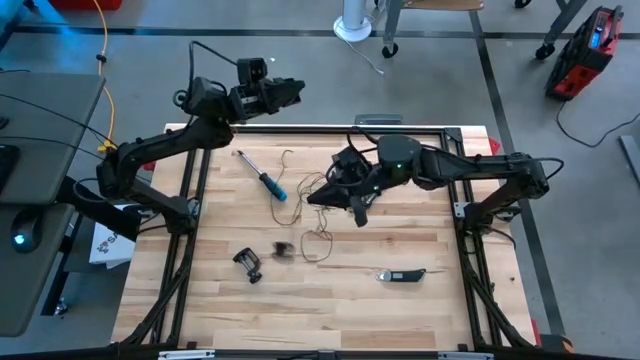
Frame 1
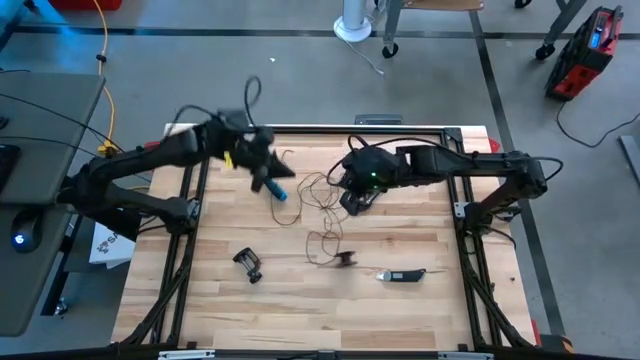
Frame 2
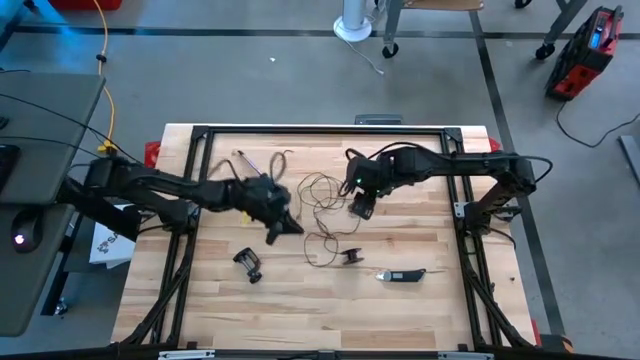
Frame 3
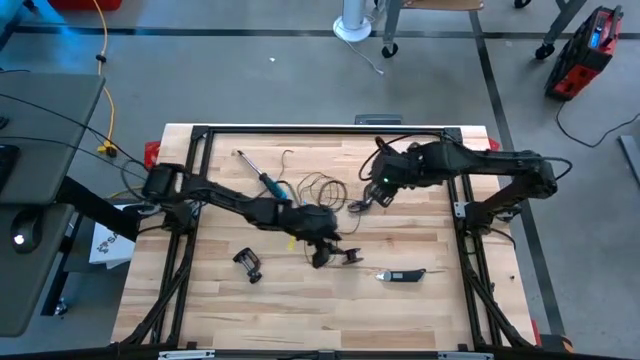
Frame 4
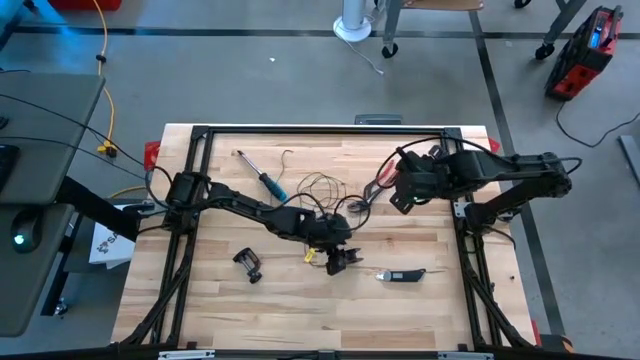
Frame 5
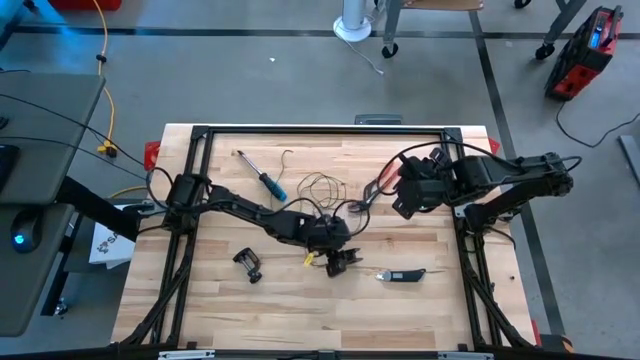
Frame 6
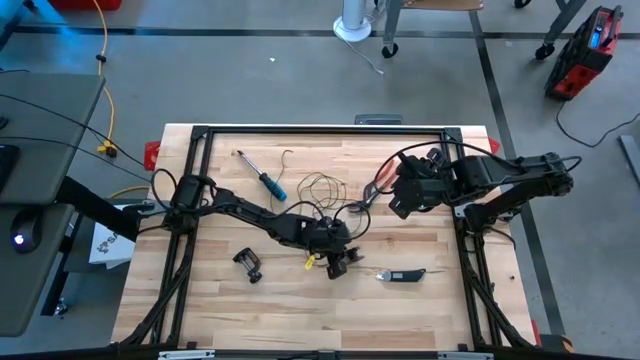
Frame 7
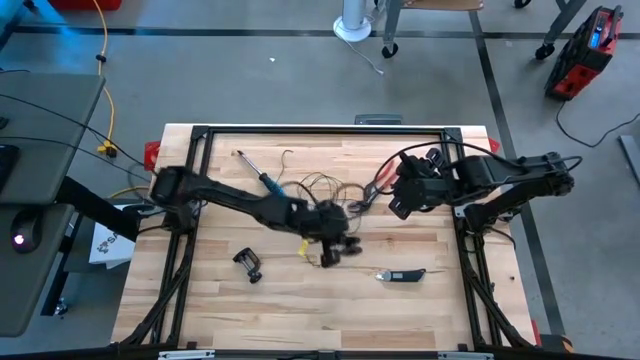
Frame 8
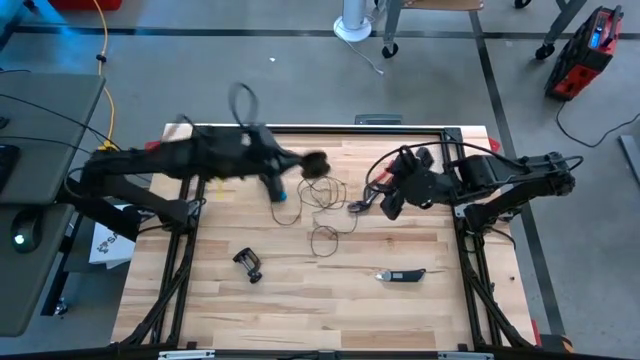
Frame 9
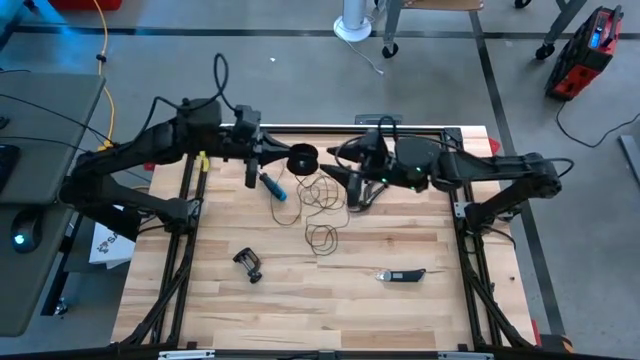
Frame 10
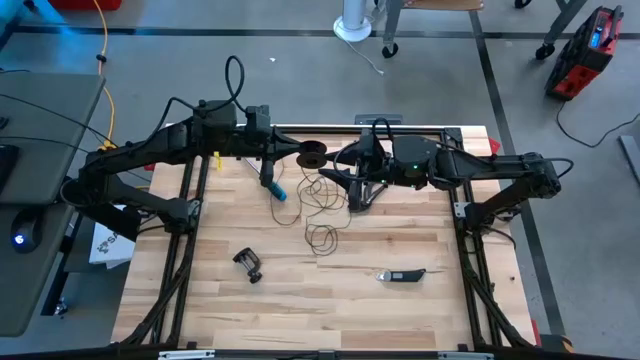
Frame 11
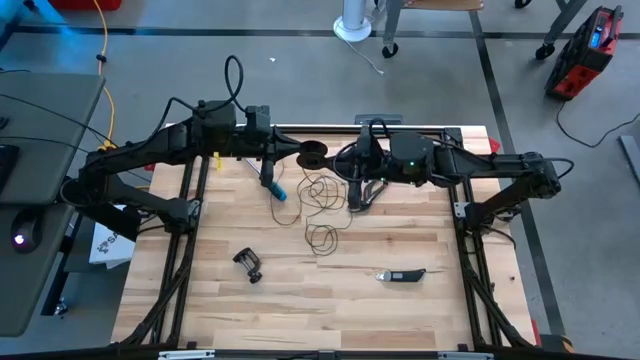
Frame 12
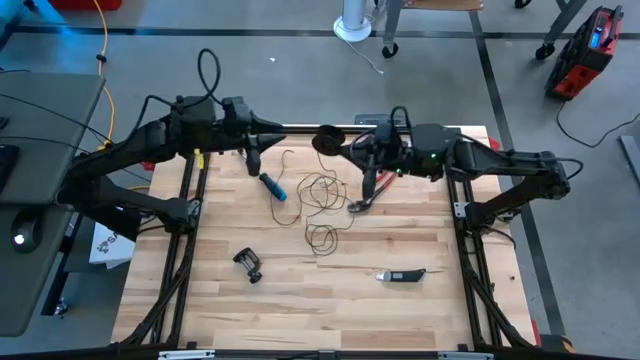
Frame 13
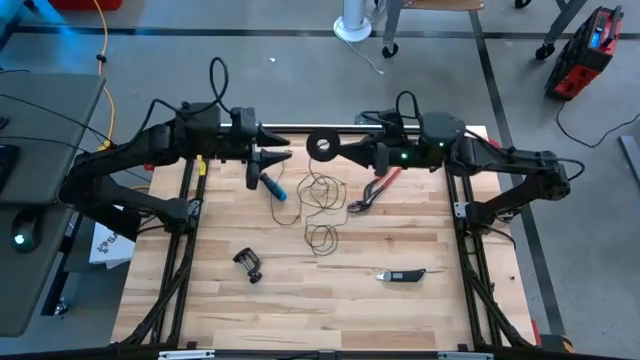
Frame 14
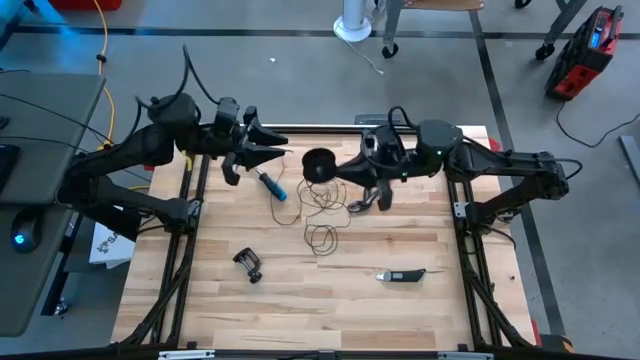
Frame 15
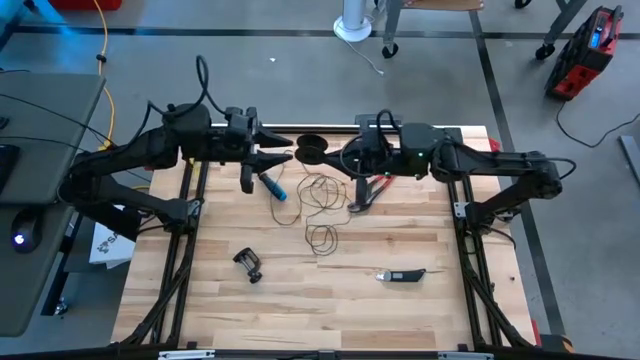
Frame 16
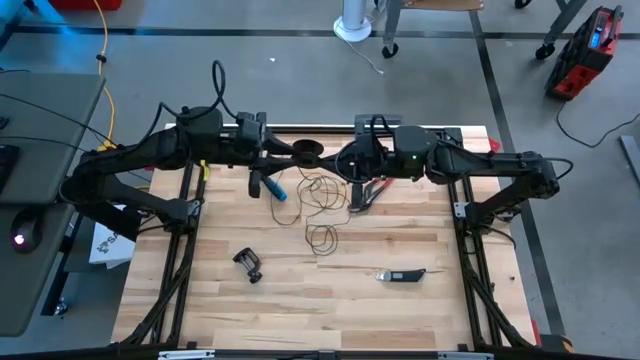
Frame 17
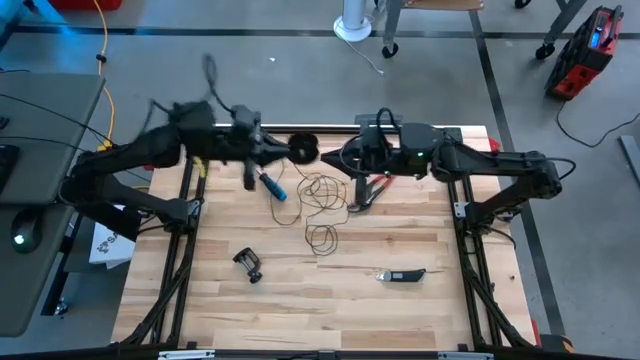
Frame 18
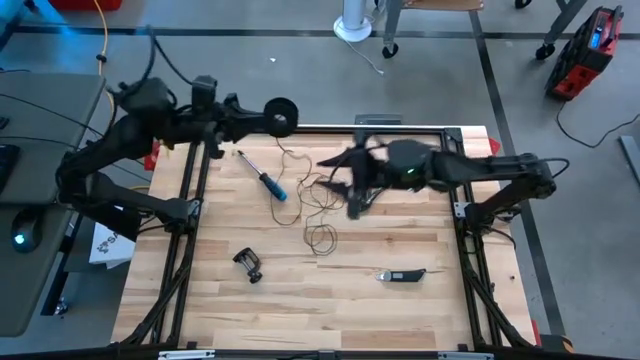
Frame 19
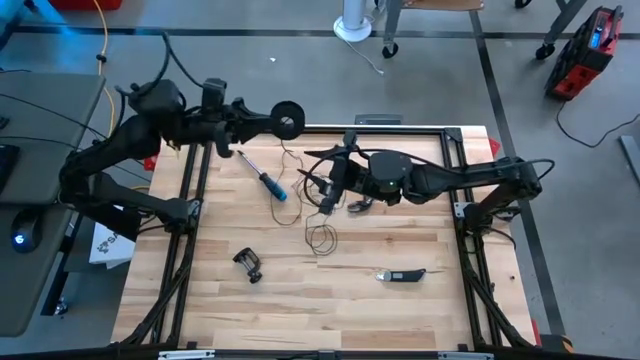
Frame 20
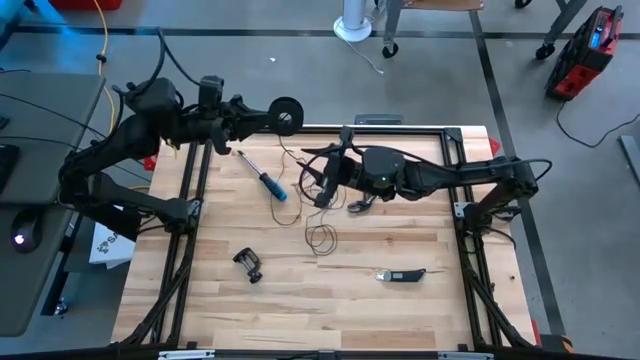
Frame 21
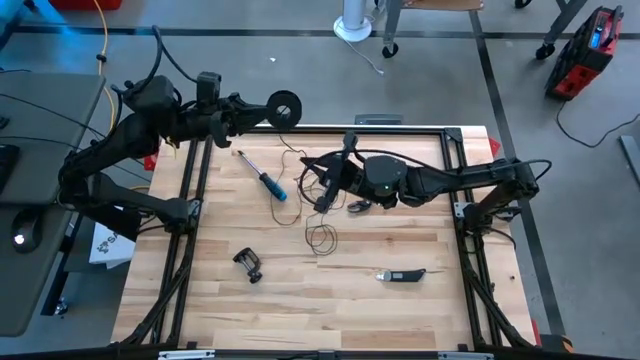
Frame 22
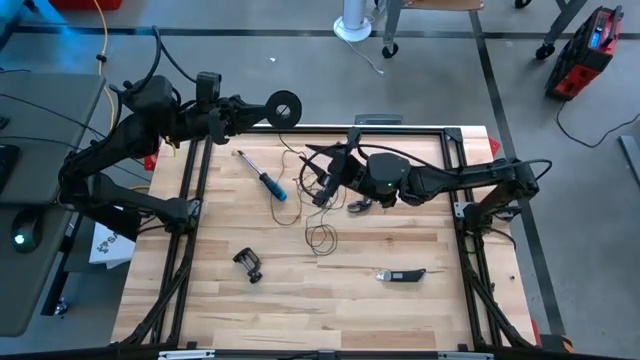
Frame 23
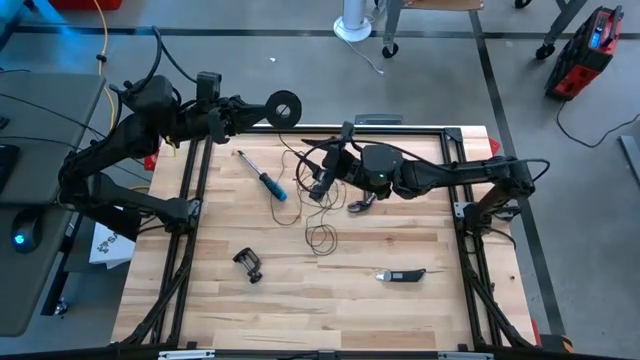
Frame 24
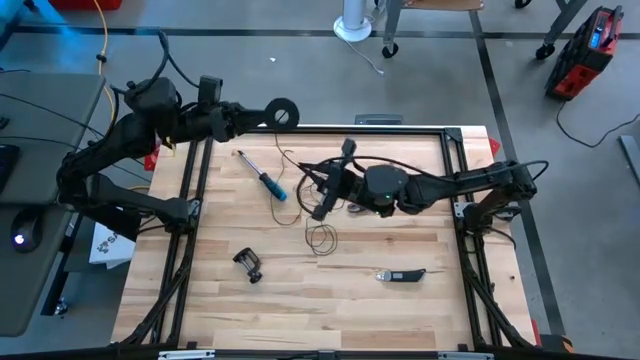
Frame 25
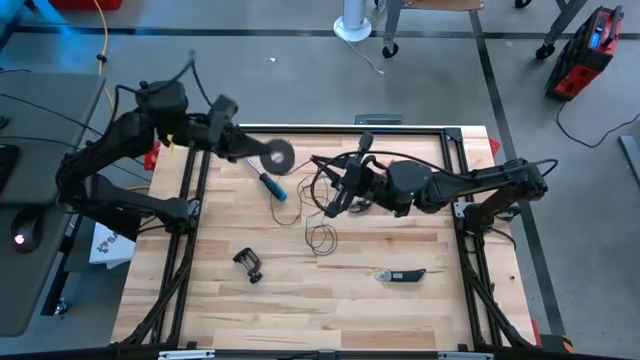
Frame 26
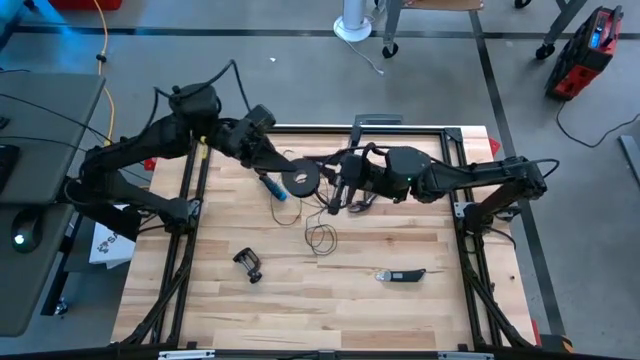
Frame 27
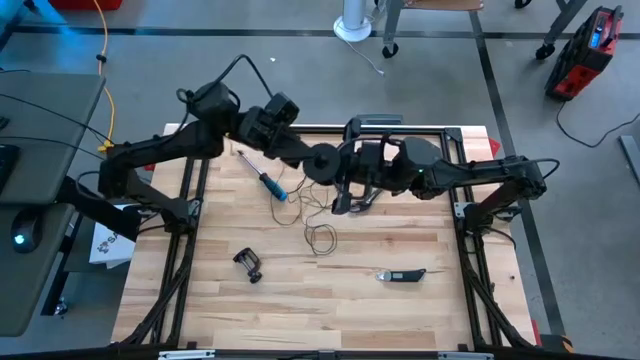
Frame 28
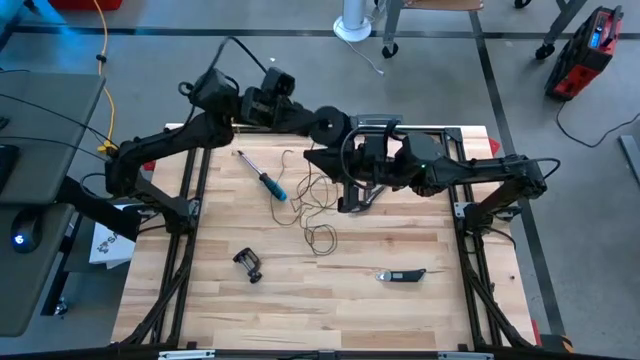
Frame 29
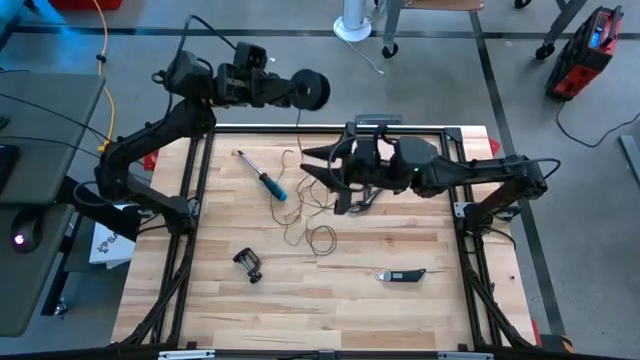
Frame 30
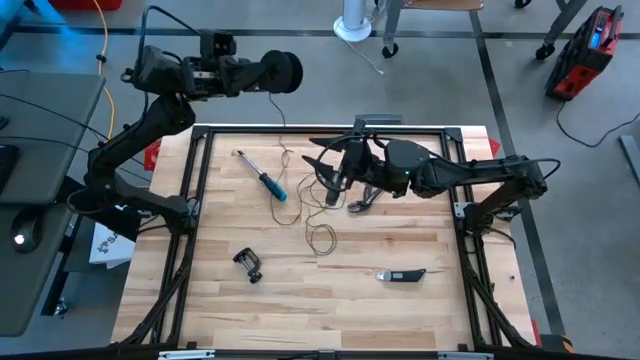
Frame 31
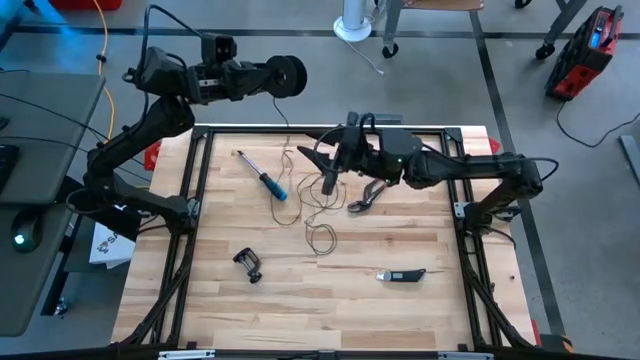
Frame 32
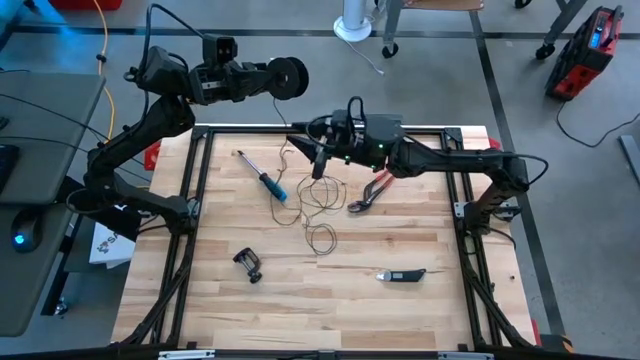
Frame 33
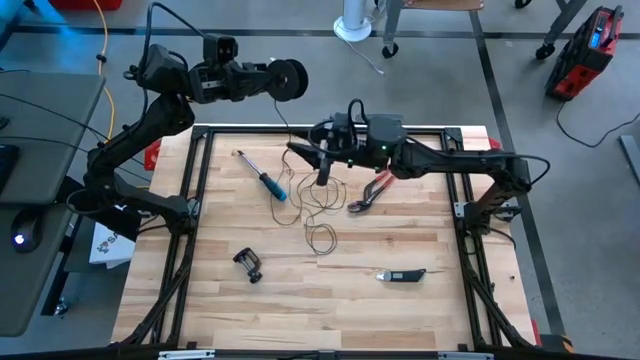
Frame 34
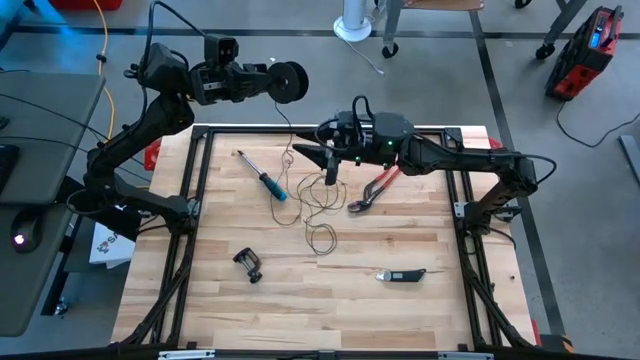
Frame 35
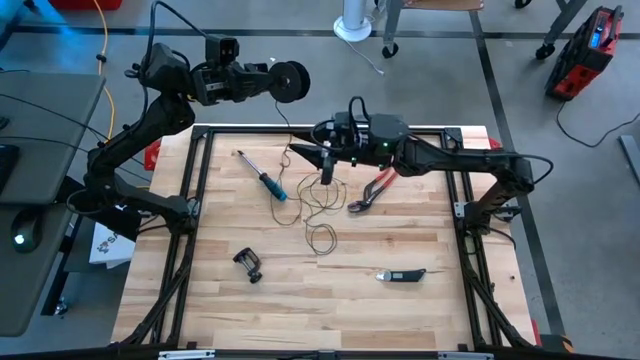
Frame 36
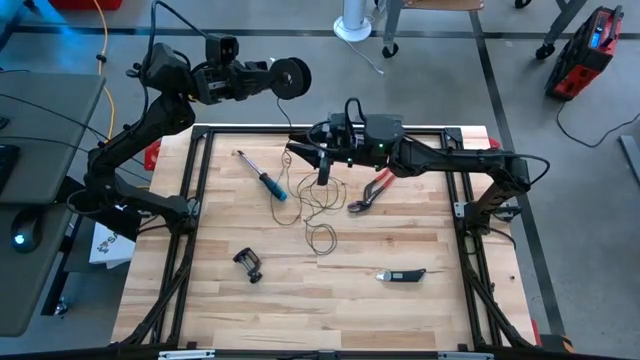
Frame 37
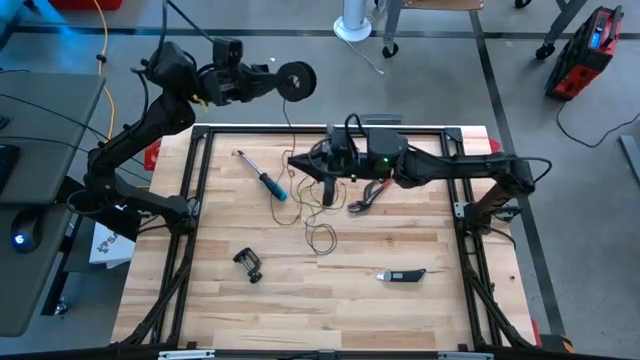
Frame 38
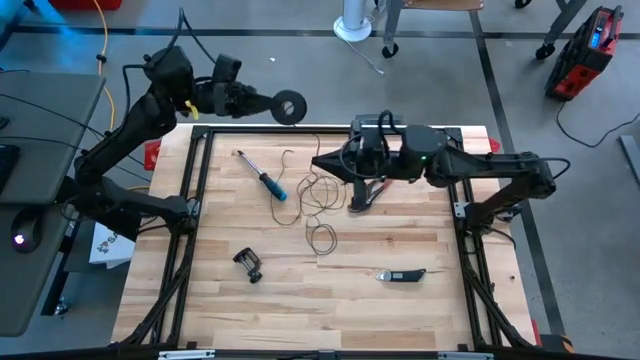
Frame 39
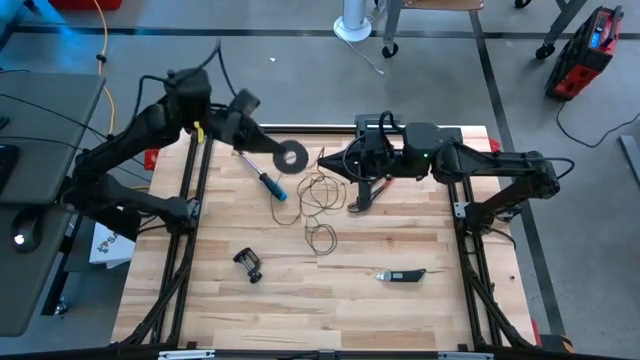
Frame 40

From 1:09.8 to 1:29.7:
Task: Coil cords
Coil the black wire onto the black spool
